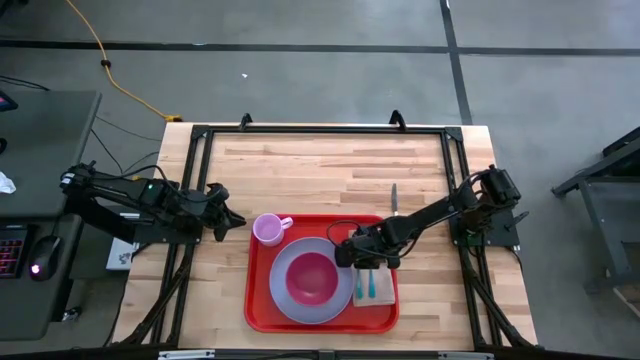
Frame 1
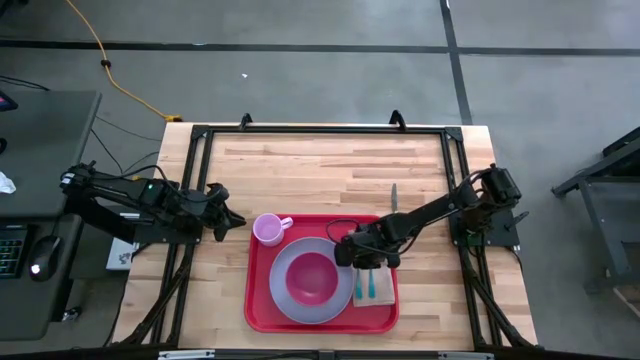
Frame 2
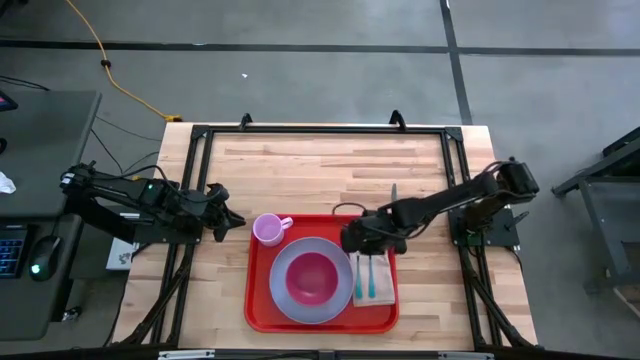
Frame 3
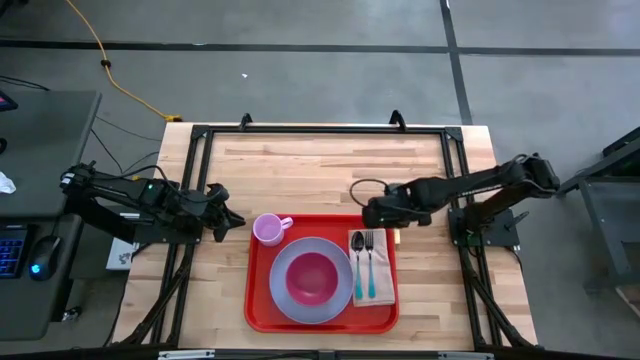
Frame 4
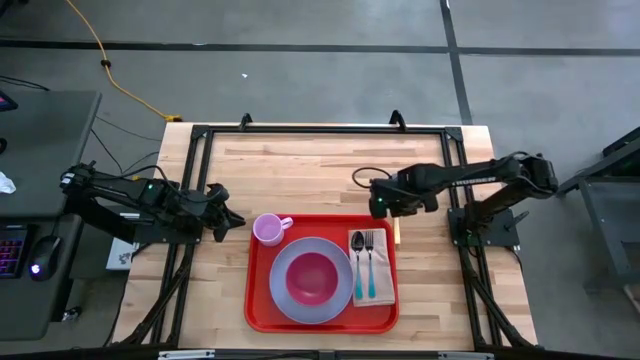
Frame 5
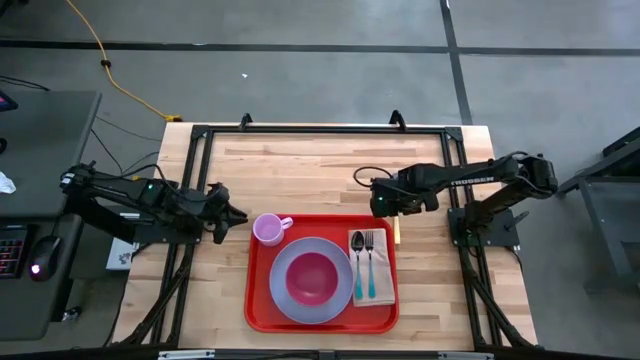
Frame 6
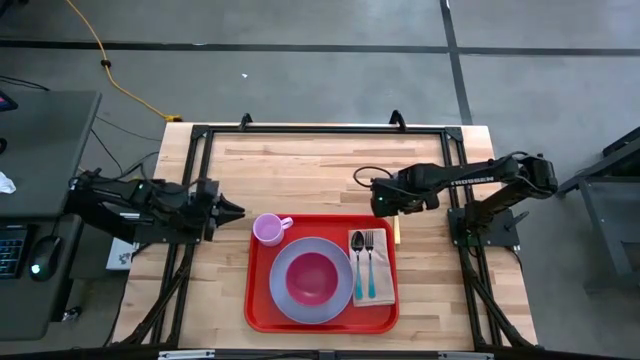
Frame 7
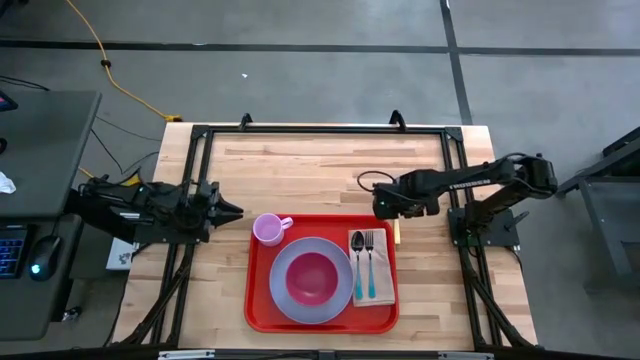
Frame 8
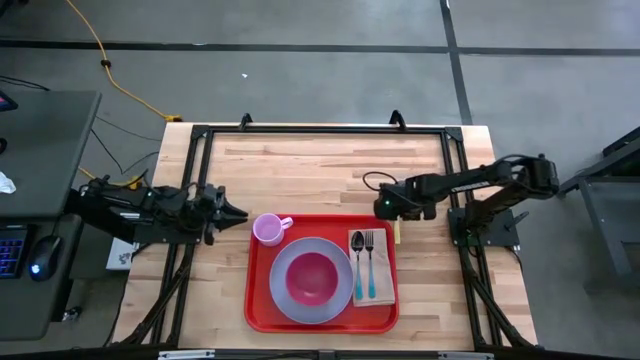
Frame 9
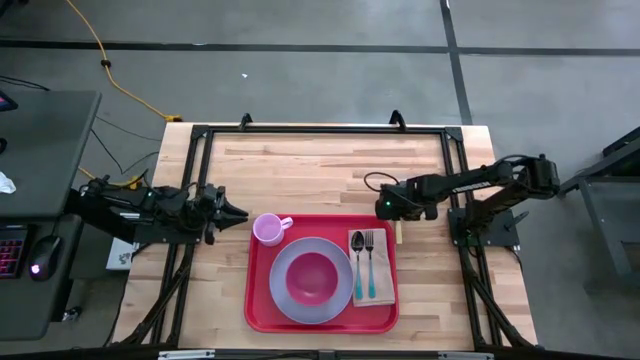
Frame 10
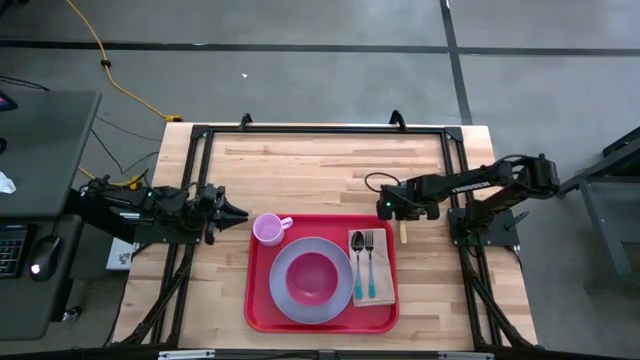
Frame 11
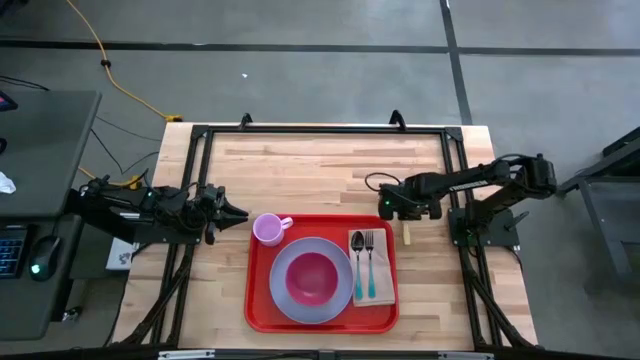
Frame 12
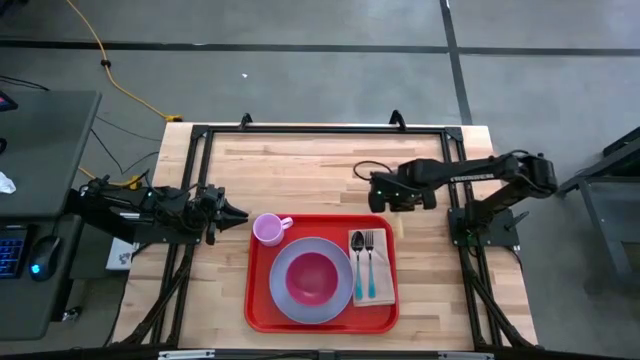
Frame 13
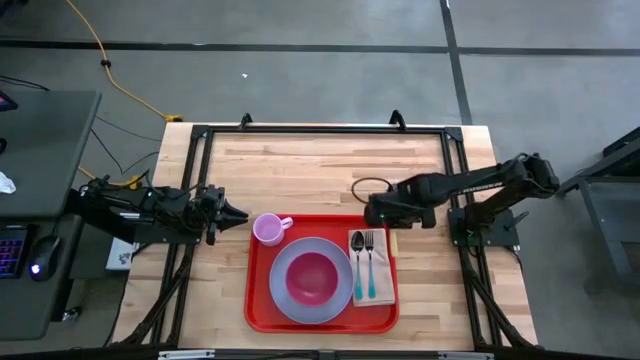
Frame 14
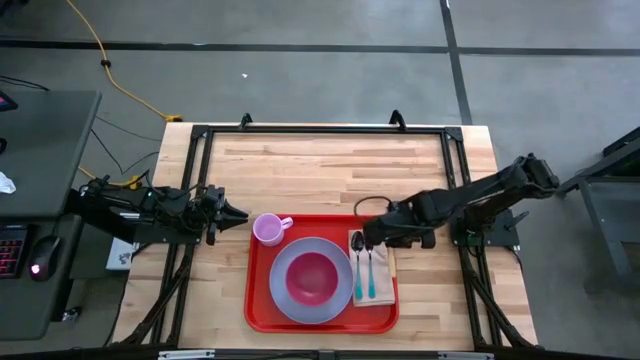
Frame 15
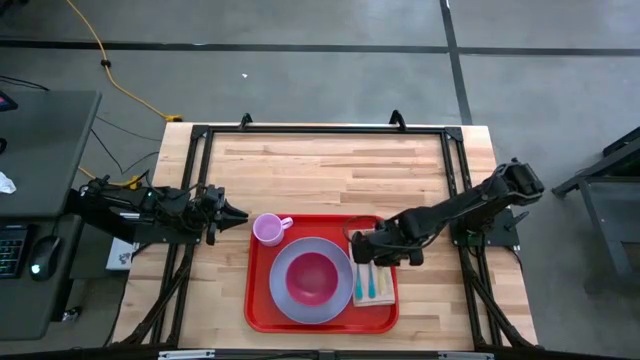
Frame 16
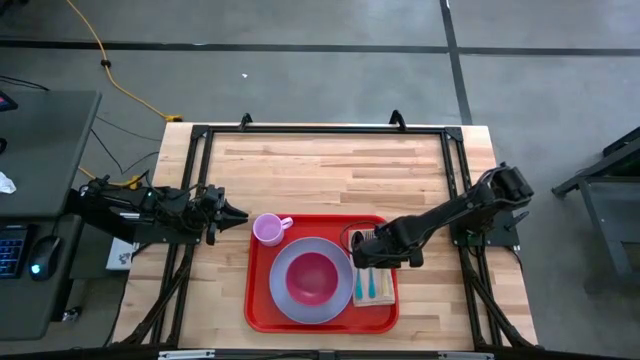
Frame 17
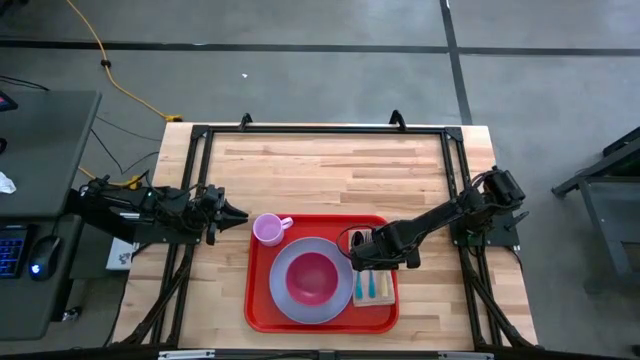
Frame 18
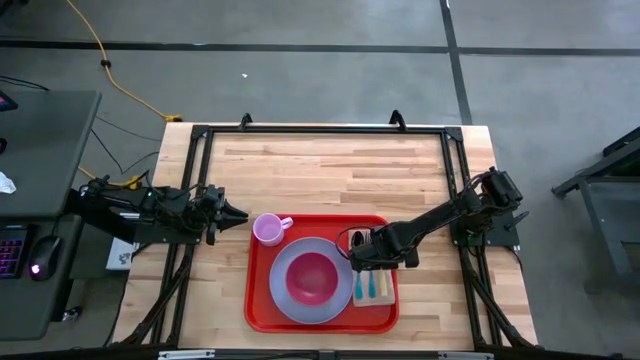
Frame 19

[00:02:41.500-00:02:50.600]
Task: Set up tray
Put the yellow knife on the brown table napkin to the right of the blue fork

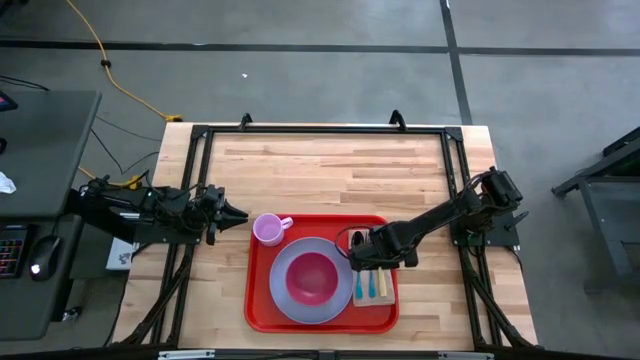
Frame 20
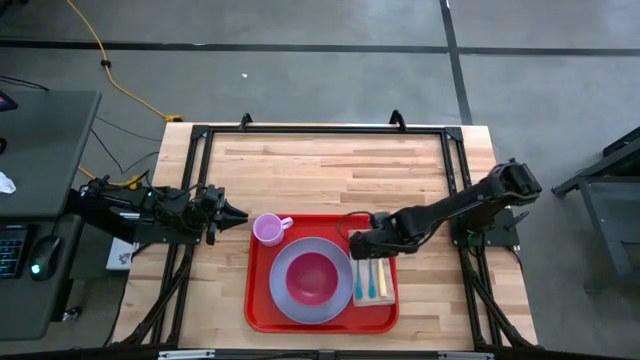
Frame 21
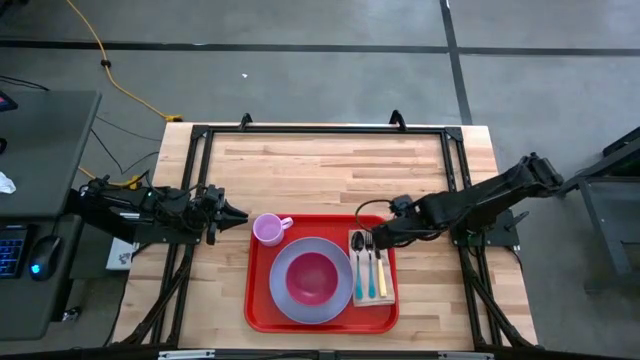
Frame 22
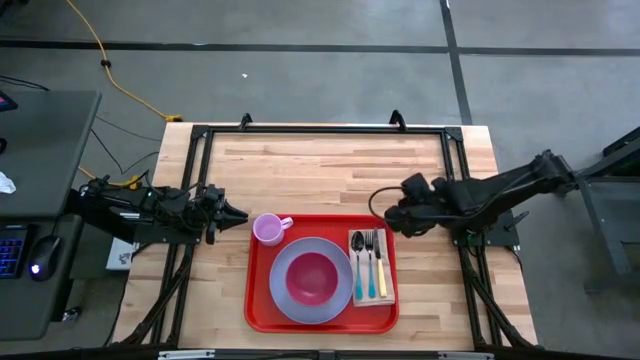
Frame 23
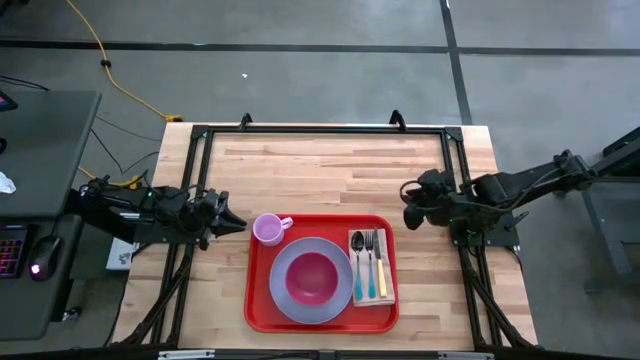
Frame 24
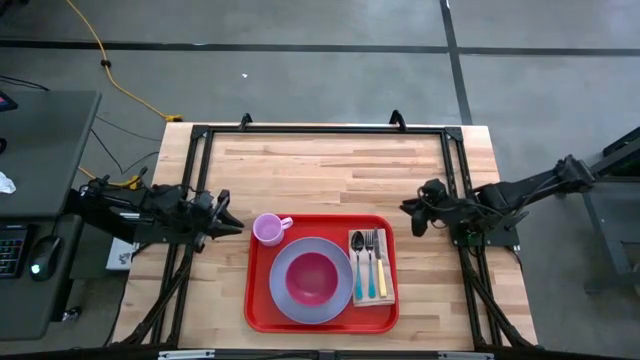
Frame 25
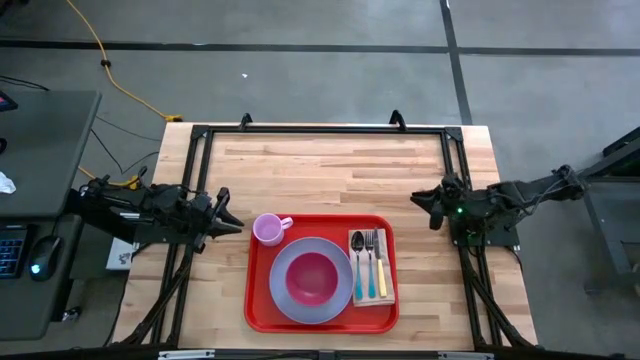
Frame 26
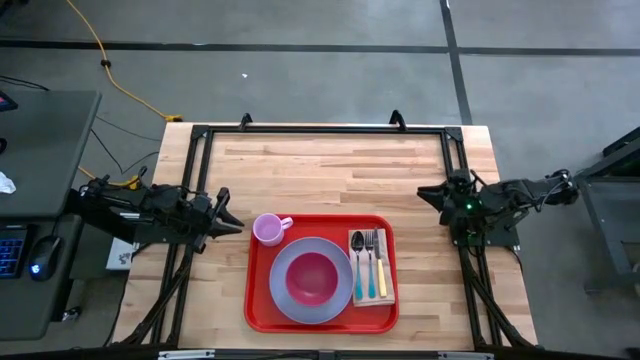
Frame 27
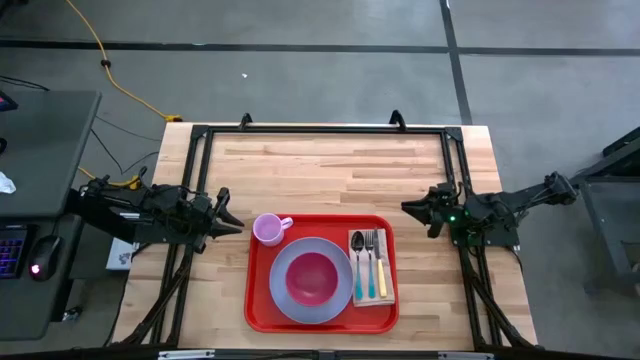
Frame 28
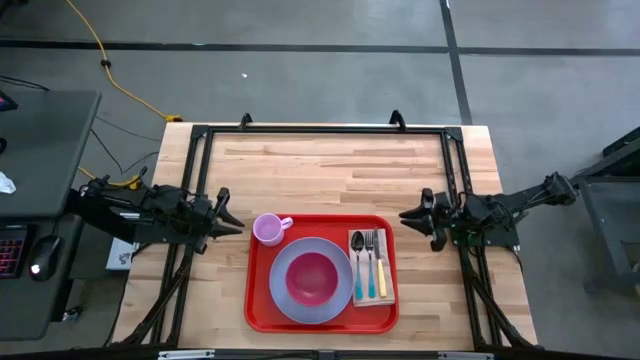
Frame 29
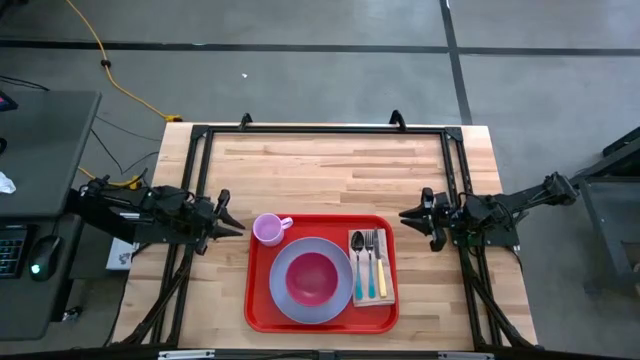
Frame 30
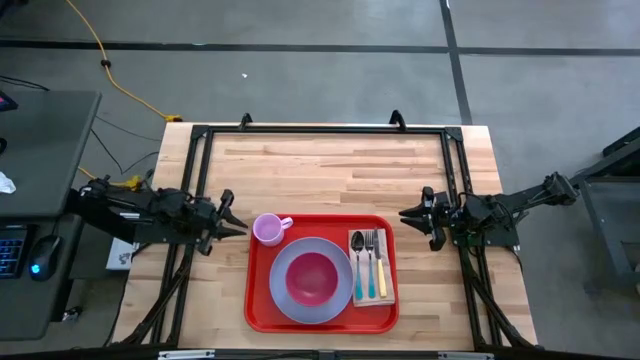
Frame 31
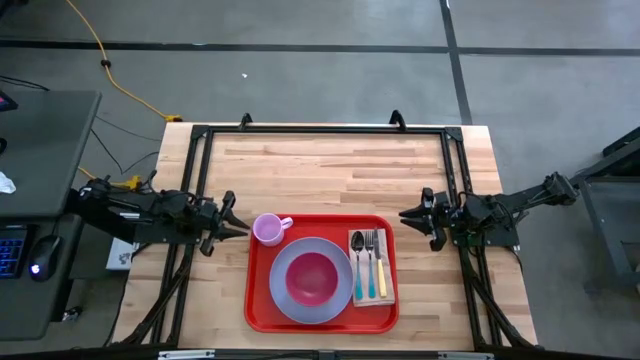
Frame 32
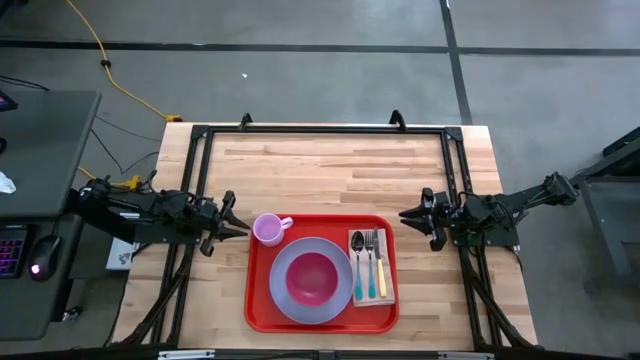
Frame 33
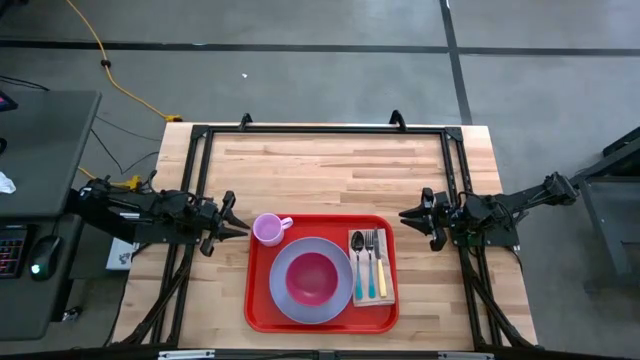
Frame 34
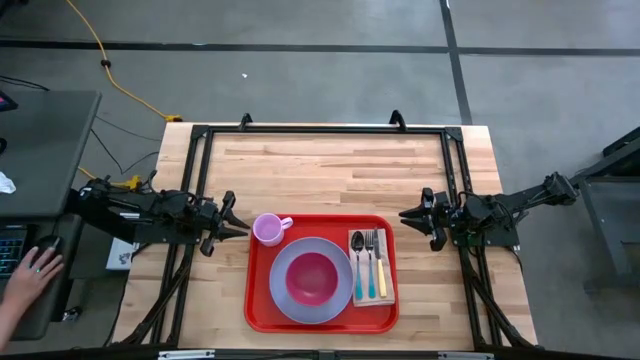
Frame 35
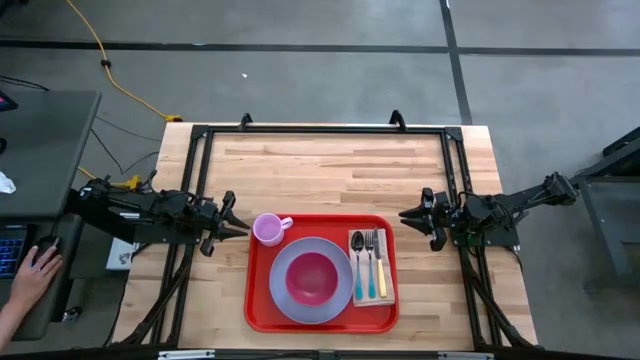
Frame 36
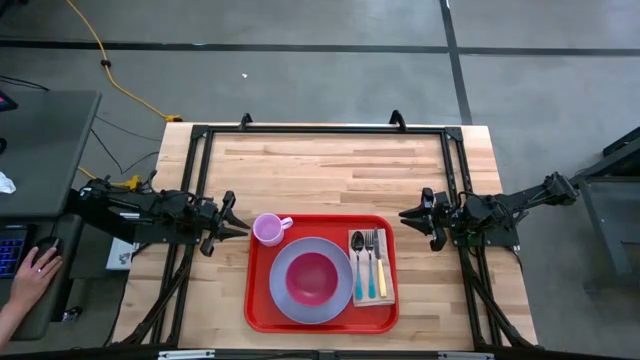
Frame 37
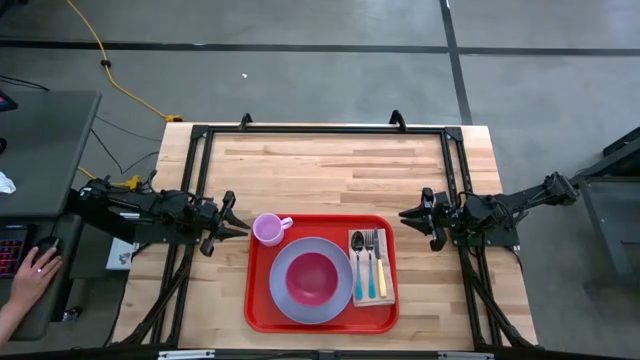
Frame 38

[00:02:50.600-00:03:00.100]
Return to Home Position

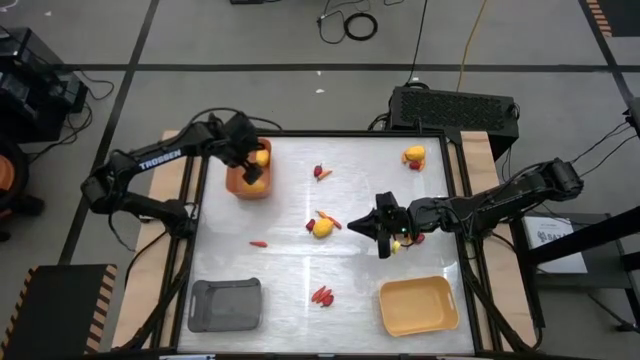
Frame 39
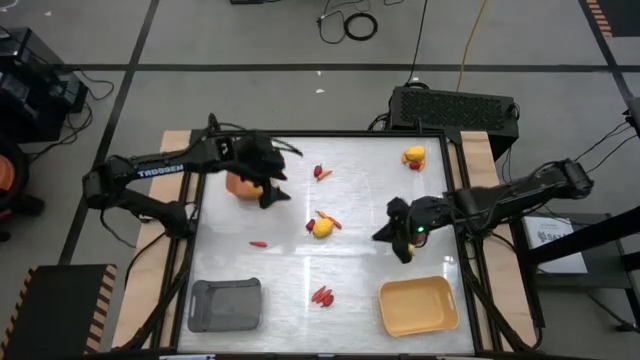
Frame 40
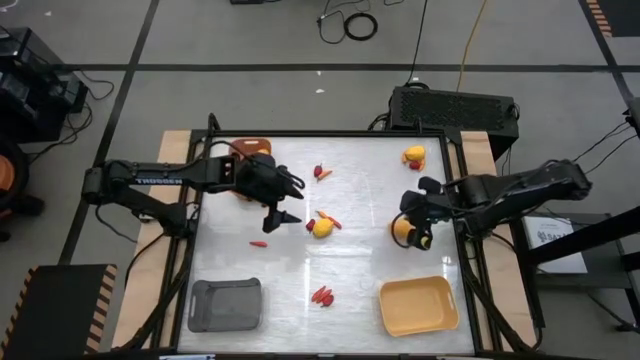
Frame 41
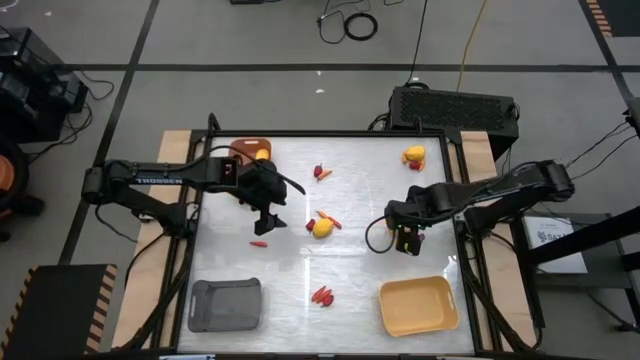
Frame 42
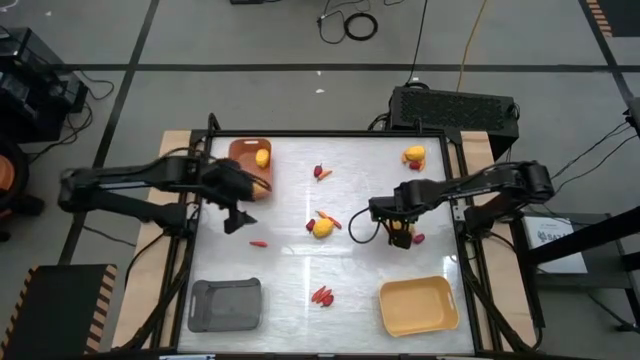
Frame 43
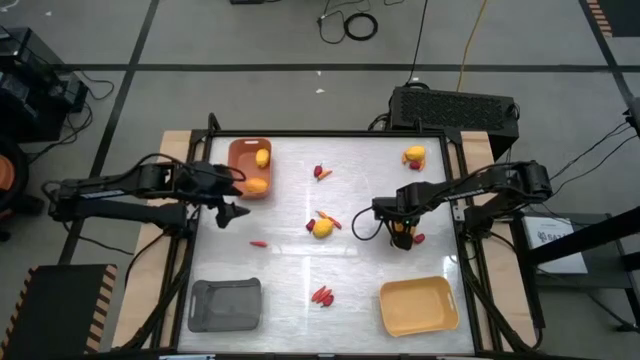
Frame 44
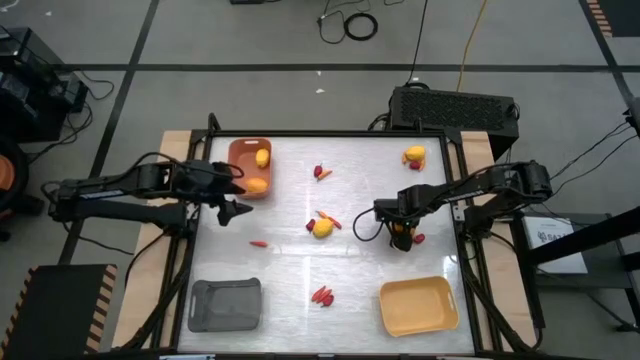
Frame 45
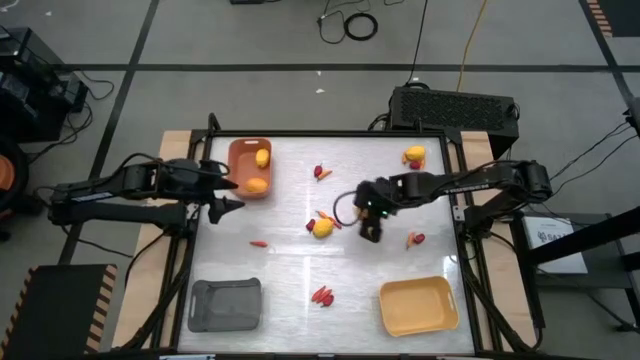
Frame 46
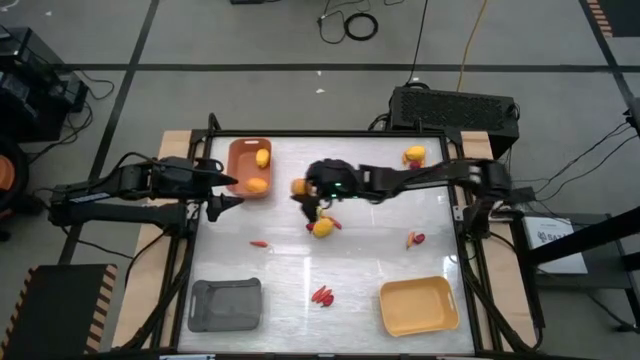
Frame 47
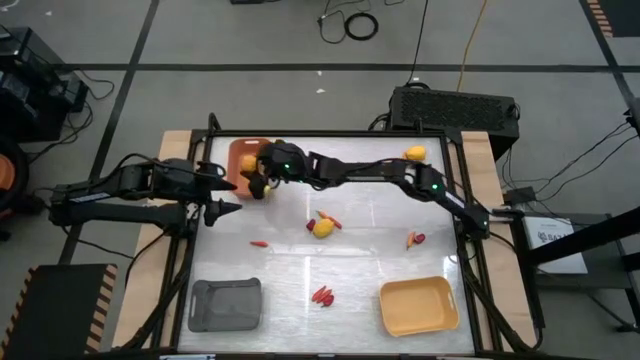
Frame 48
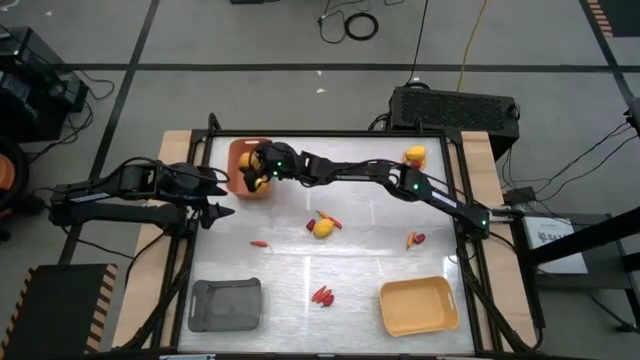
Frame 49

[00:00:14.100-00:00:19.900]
Task: Sort produce into baskets
Put the lemon into the orange bin
